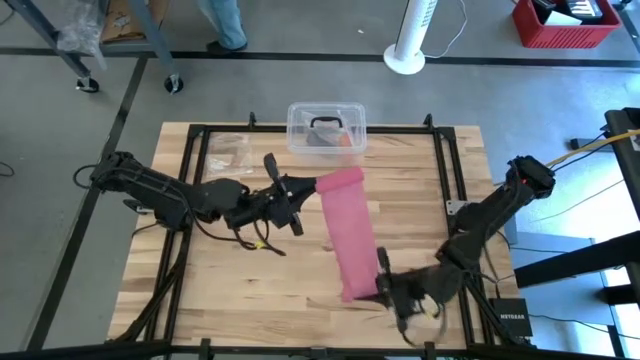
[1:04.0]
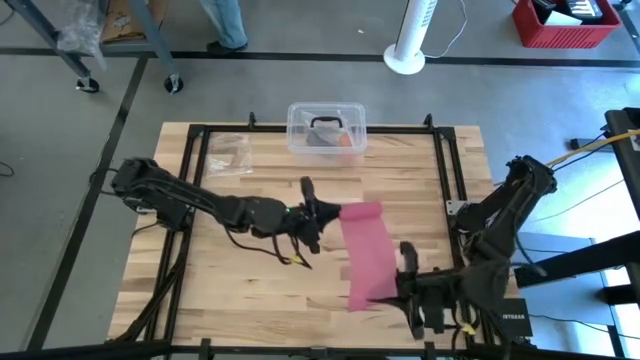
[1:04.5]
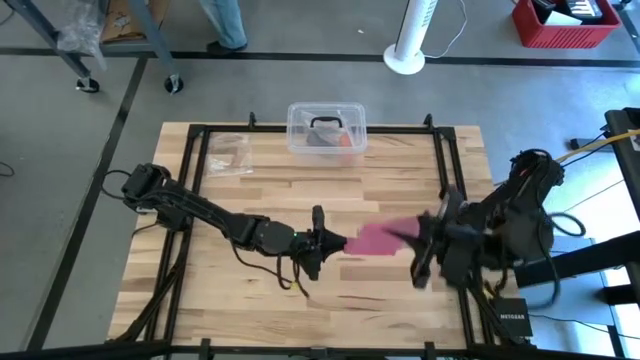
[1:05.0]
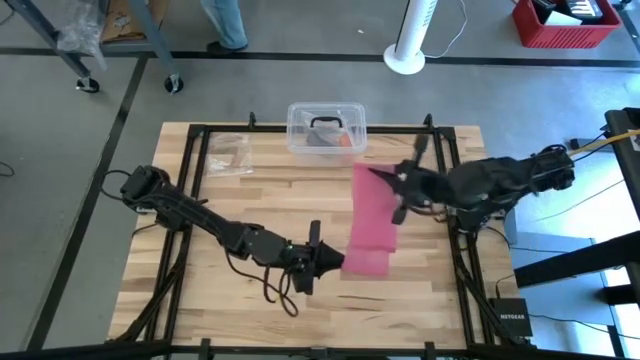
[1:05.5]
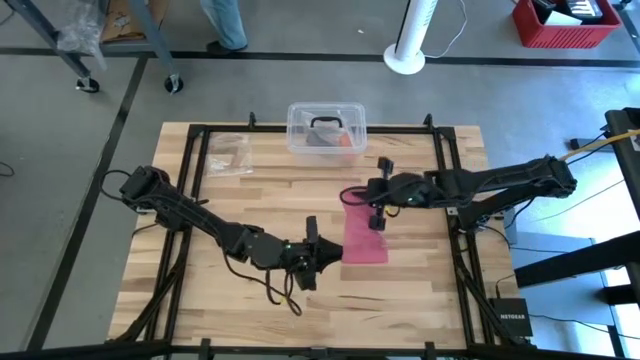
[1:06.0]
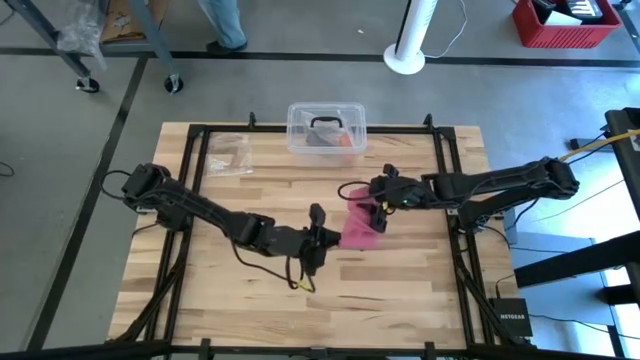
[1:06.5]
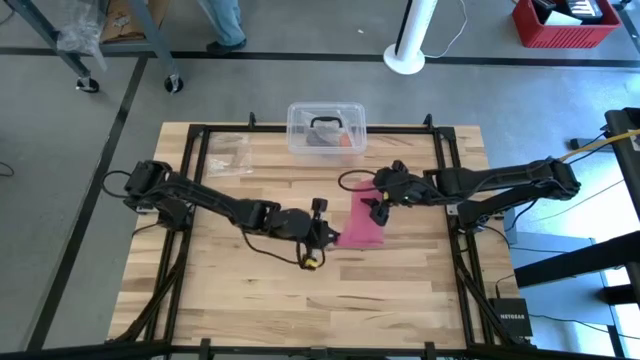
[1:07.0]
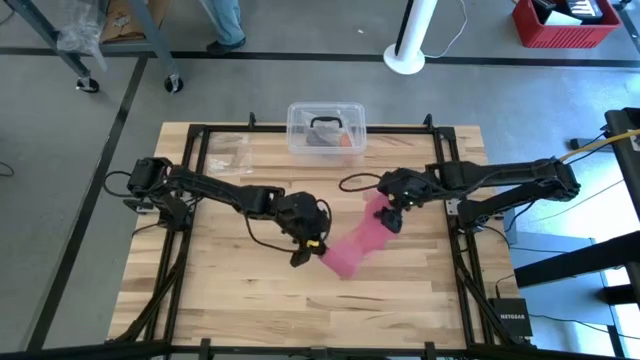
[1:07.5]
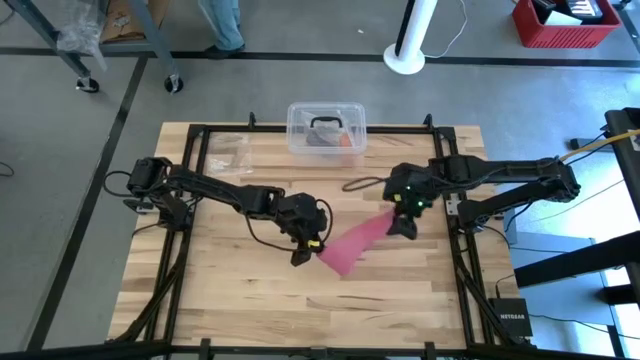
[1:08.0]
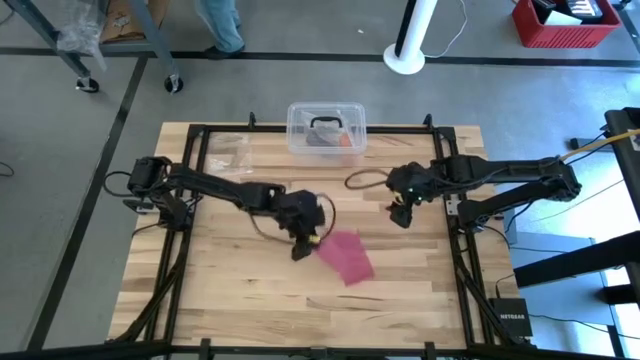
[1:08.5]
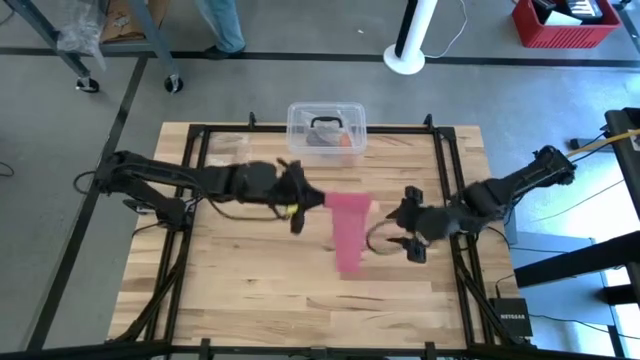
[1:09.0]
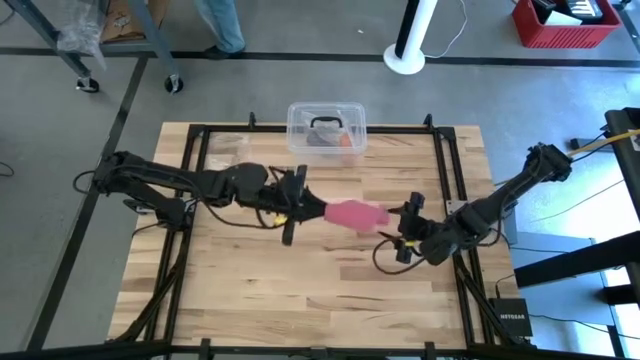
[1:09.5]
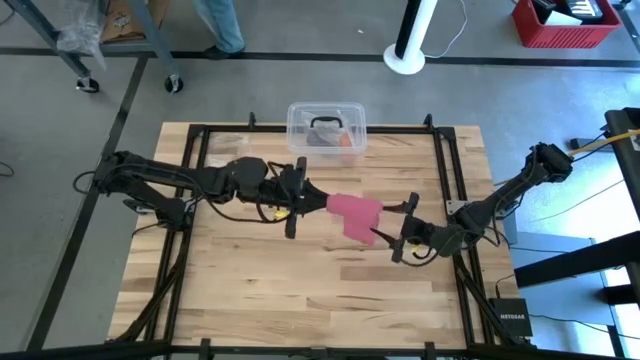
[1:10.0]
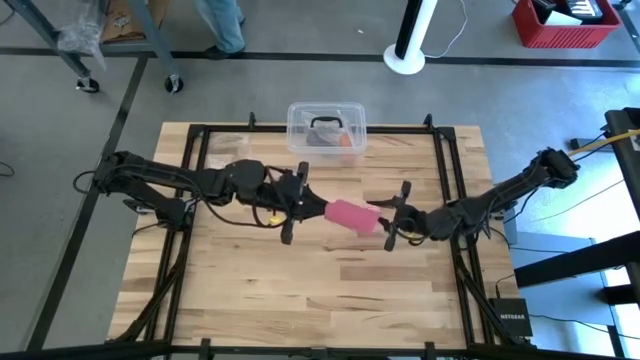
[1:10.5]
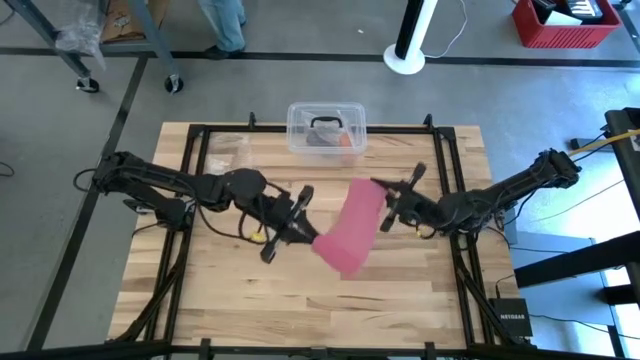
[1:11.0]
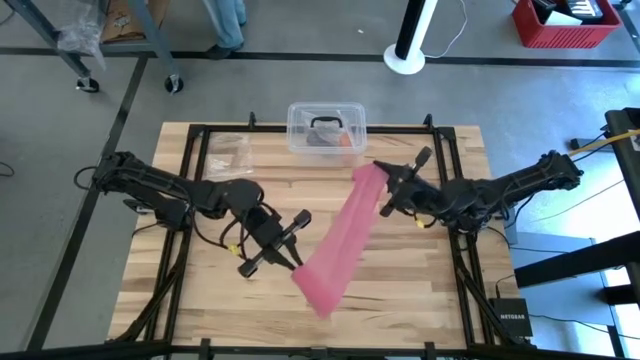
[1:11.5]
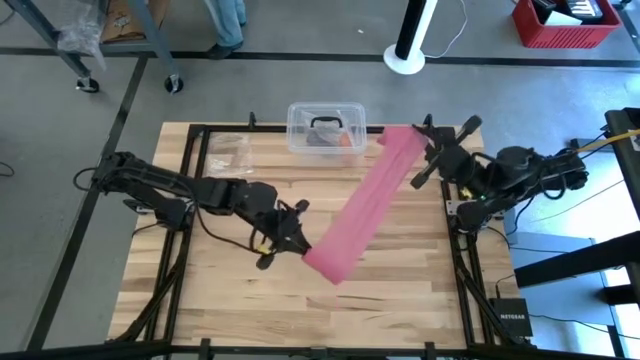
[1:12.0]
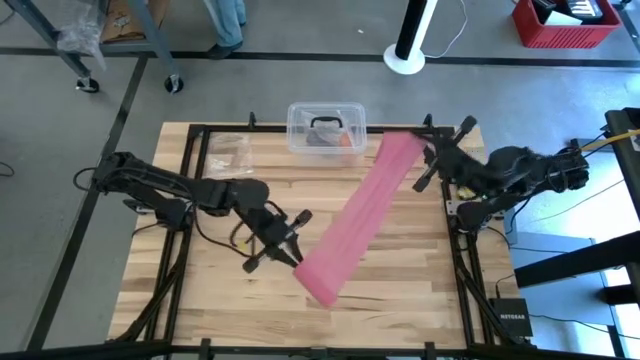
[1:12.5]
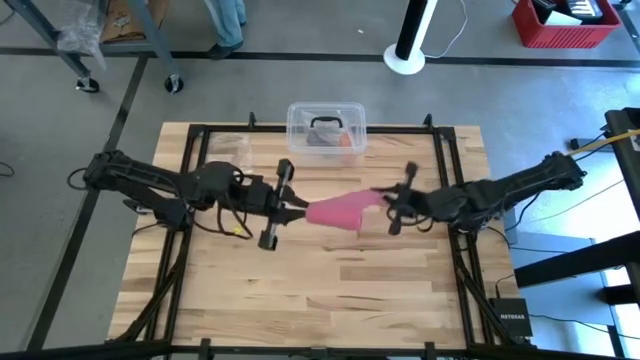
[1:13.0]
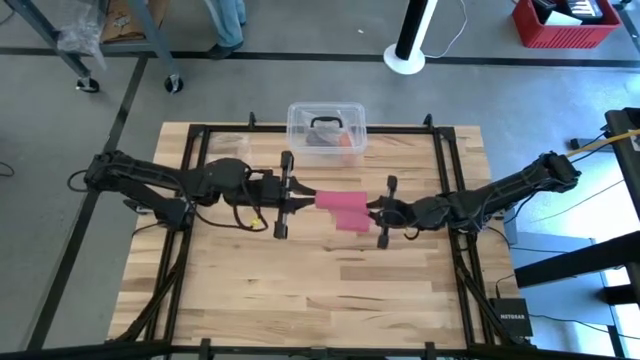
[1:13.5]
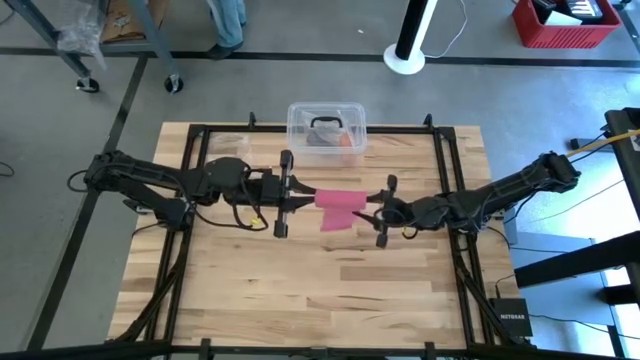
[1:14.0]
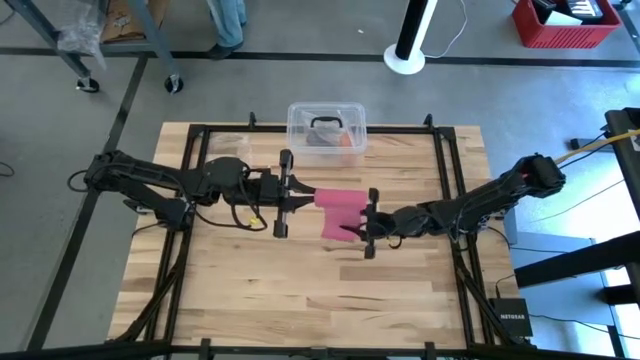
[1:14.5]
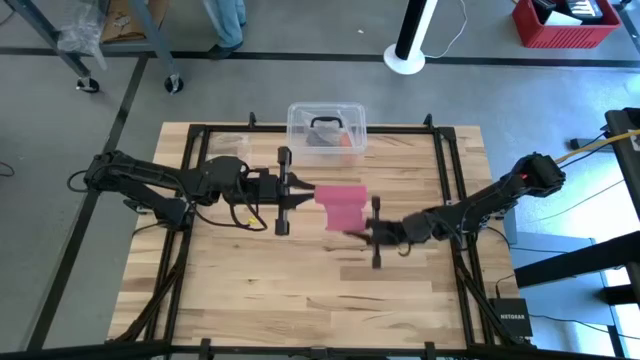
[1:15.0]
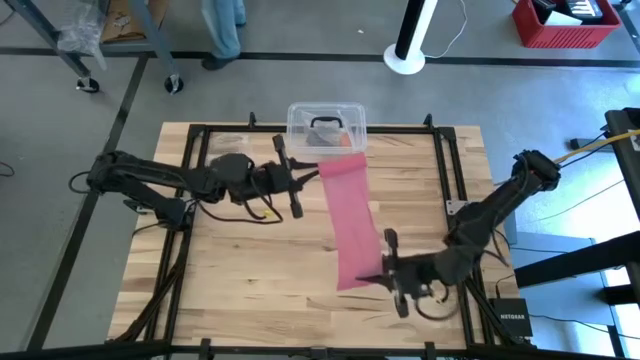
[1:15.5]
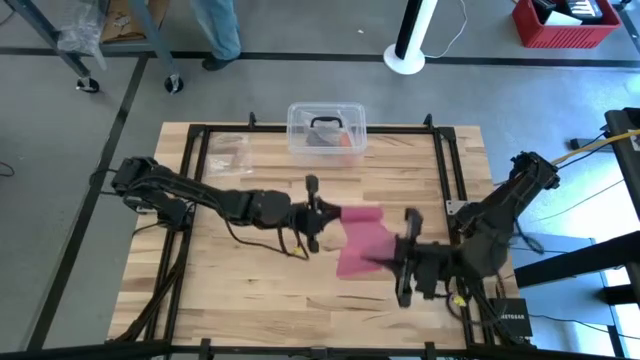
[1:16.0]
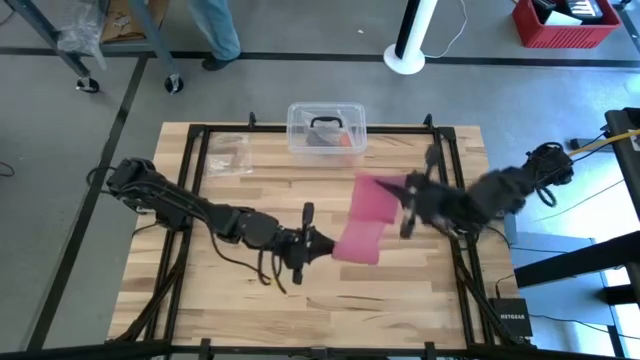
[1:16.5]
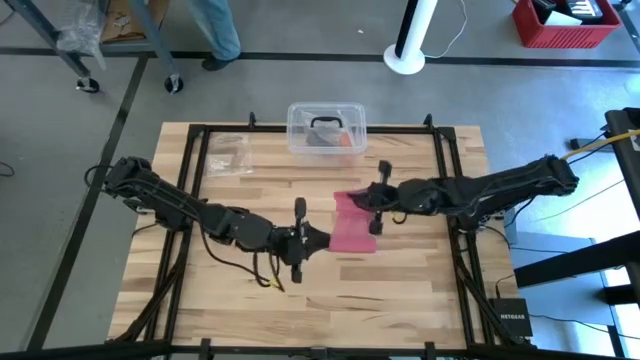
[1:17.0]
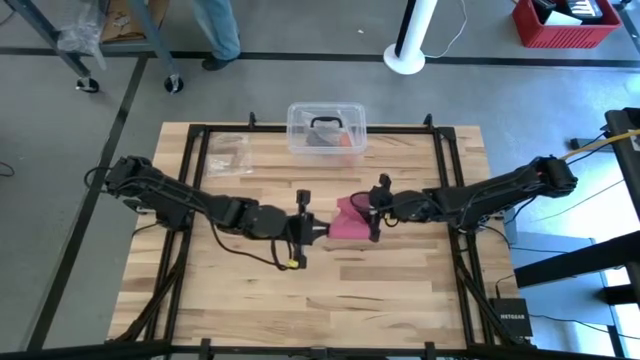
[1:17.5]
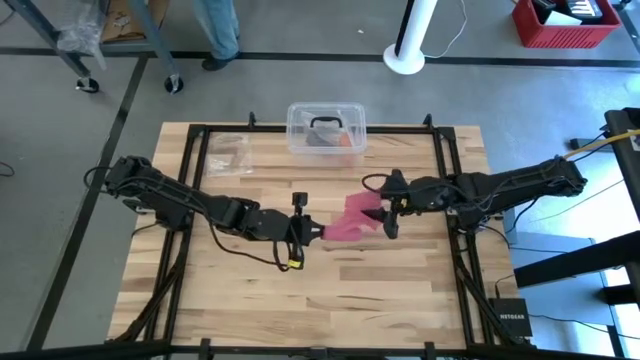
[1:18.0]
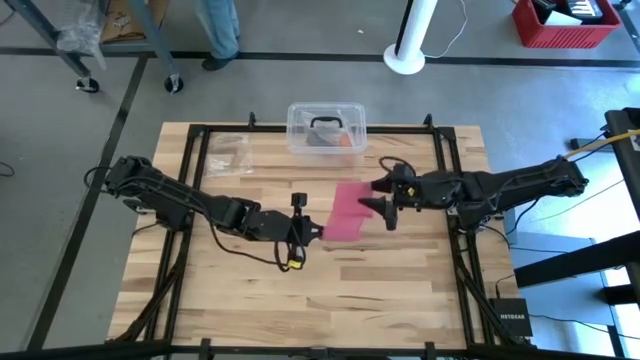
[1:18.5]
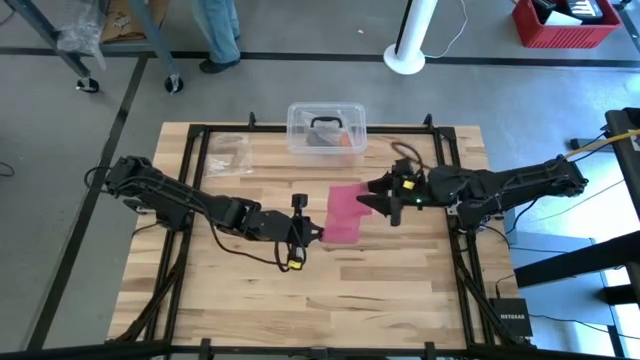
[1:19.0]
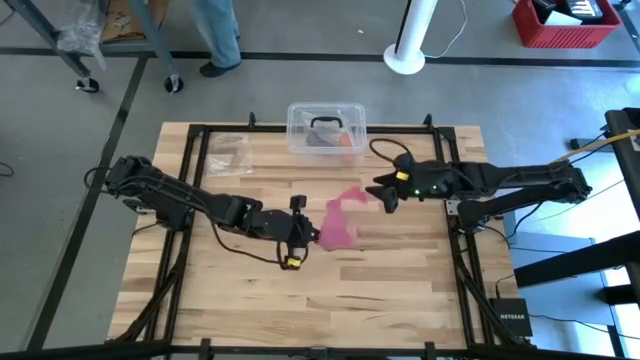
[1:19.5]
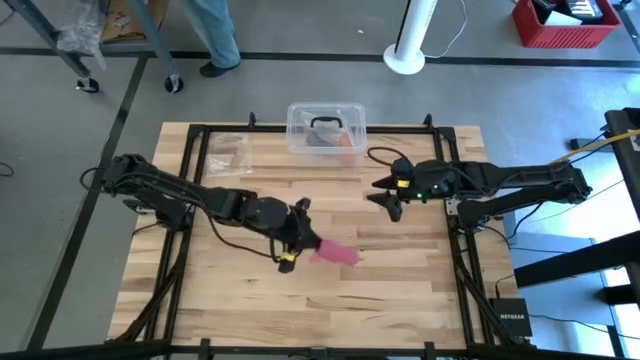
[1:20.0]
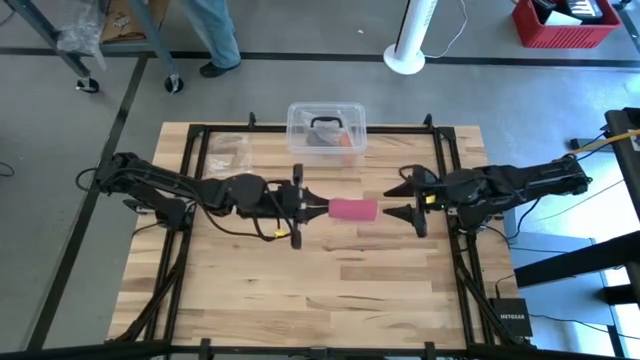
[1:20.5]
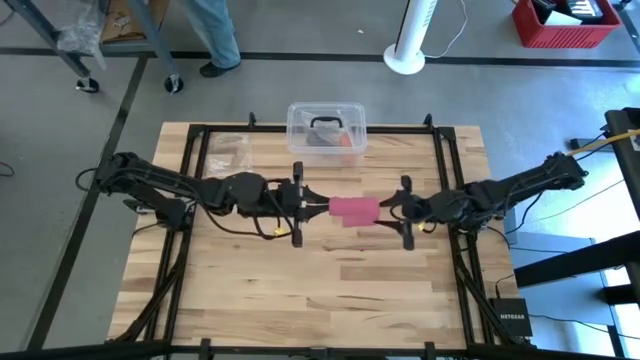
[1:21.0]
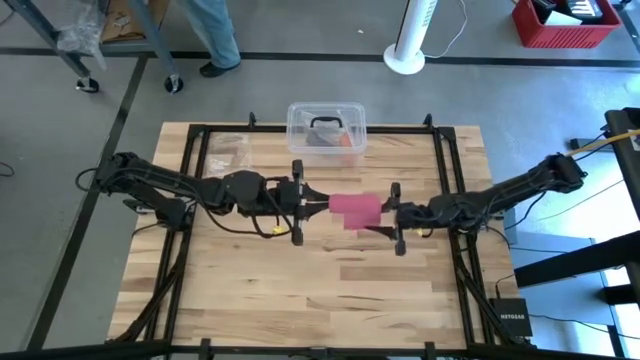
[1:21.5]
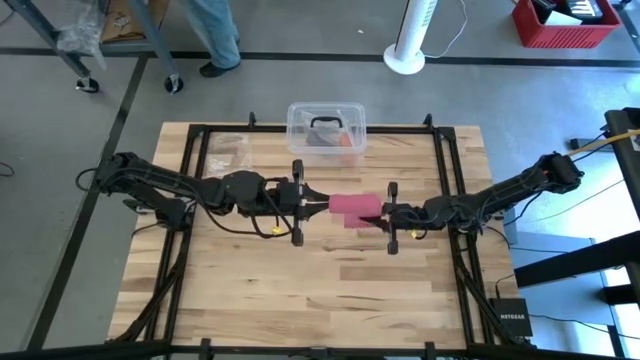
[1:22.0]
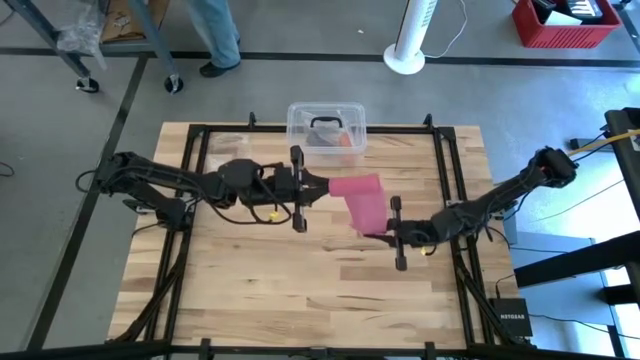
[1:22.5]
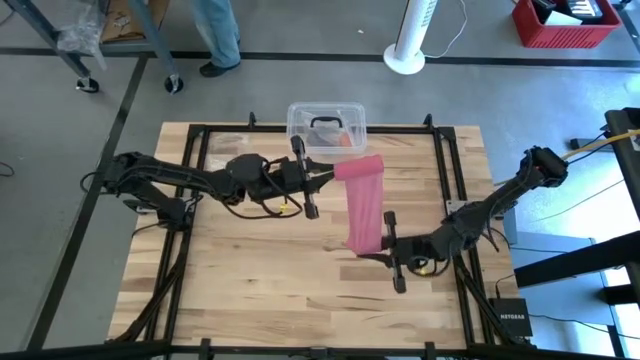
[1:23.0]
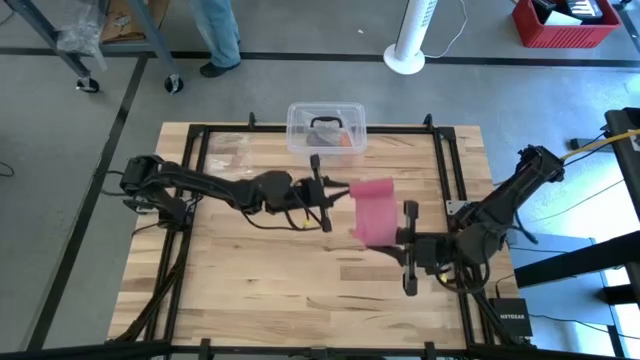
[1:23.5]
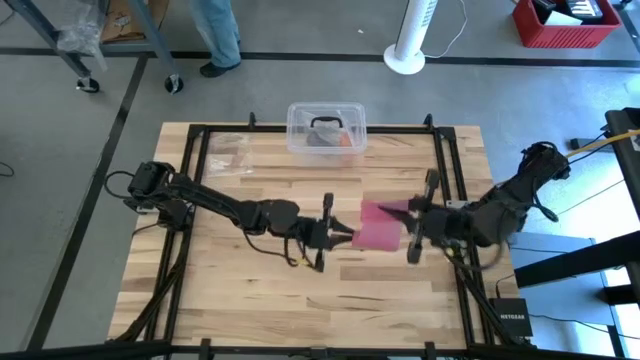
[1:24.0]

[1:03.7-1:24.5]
Task: Roll bandage
Roll the pink bandage
